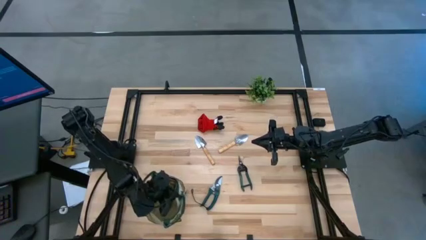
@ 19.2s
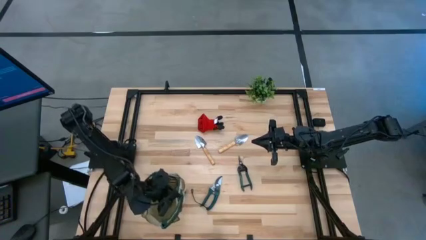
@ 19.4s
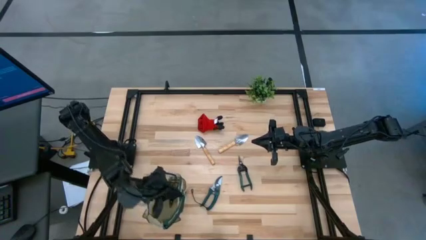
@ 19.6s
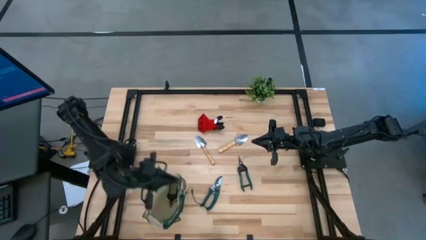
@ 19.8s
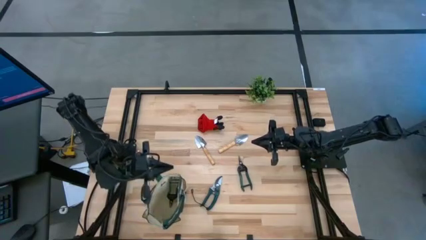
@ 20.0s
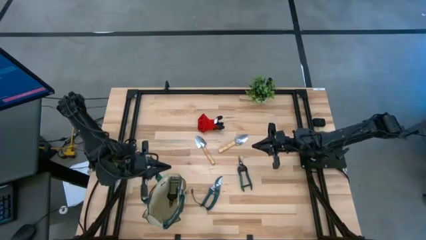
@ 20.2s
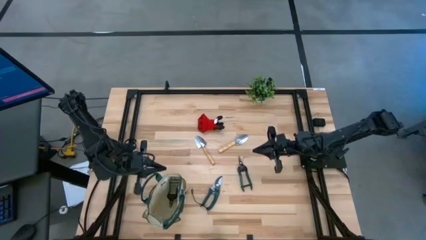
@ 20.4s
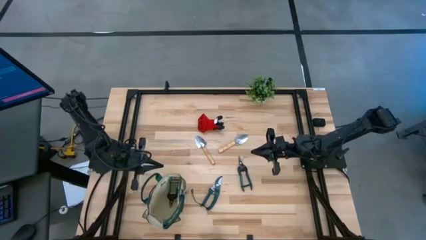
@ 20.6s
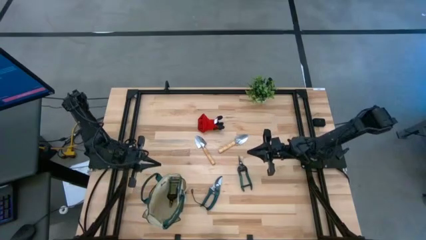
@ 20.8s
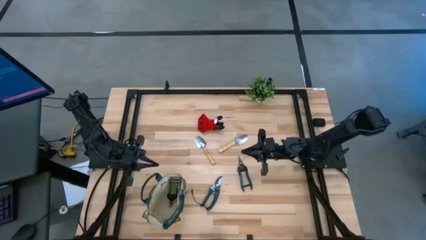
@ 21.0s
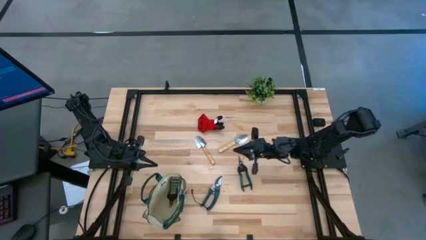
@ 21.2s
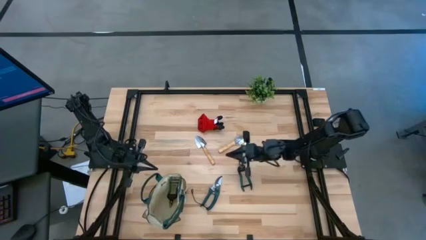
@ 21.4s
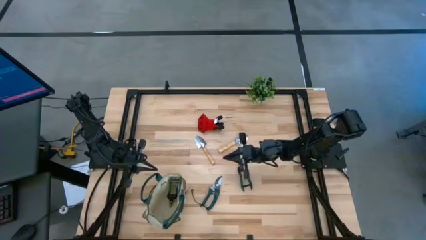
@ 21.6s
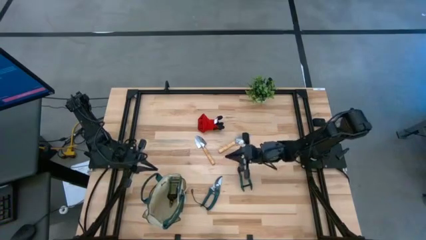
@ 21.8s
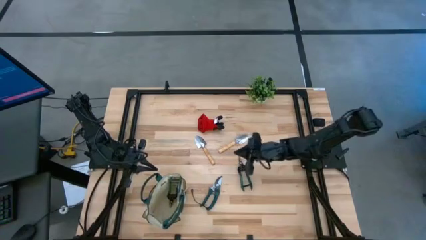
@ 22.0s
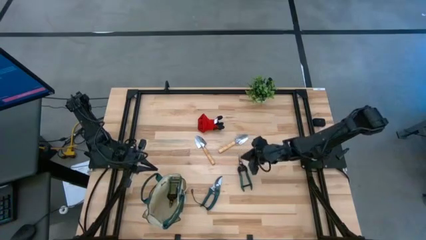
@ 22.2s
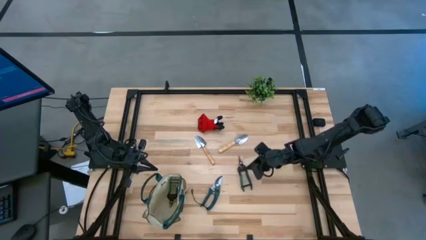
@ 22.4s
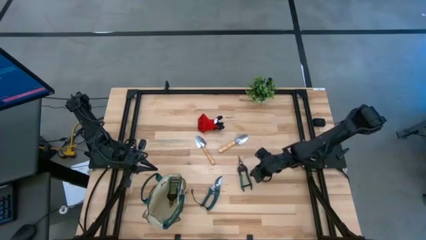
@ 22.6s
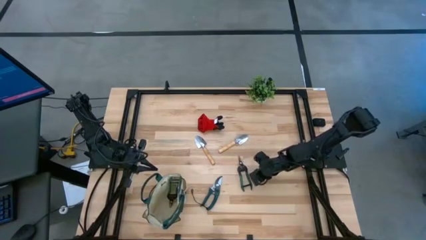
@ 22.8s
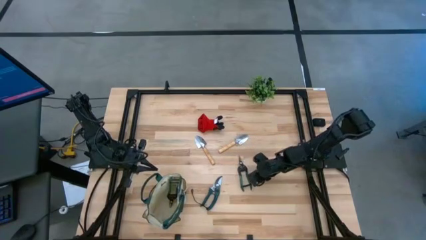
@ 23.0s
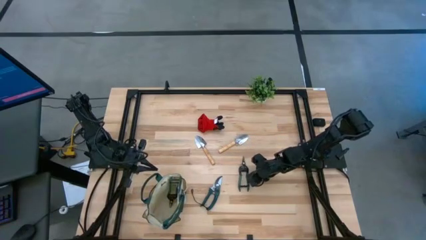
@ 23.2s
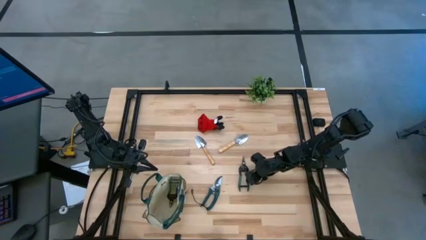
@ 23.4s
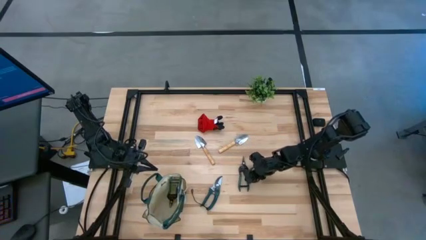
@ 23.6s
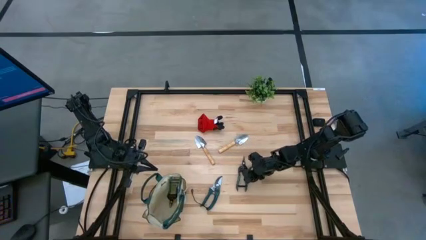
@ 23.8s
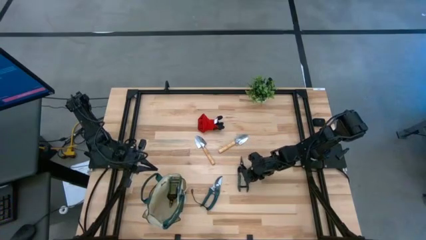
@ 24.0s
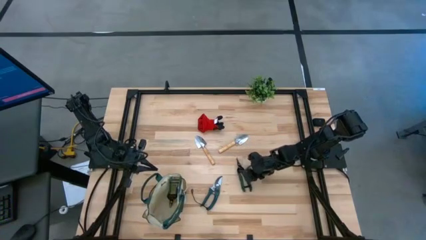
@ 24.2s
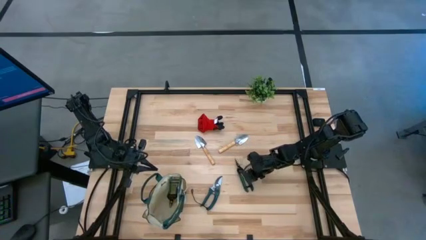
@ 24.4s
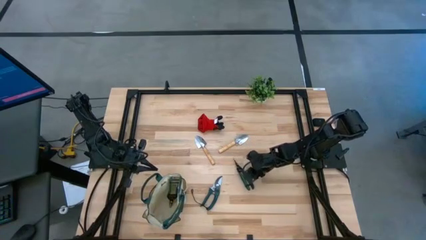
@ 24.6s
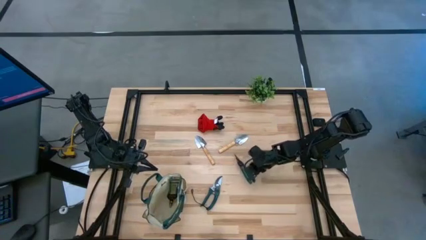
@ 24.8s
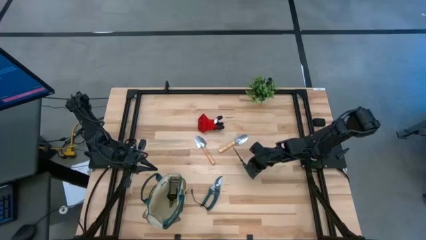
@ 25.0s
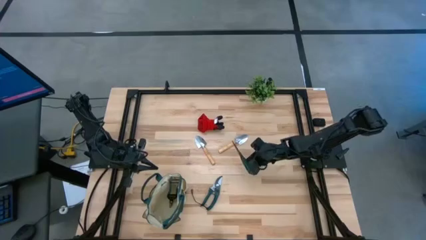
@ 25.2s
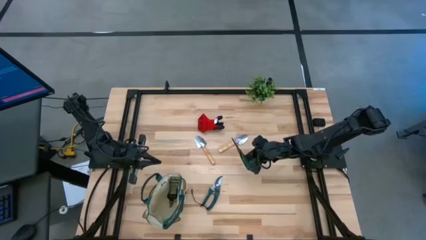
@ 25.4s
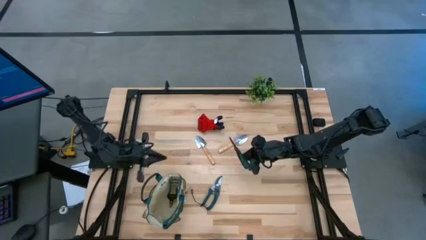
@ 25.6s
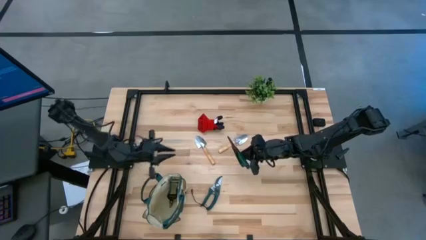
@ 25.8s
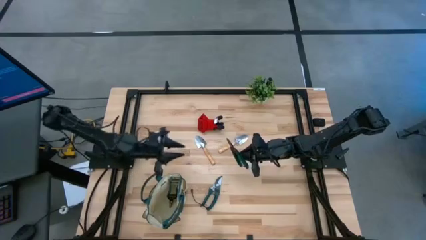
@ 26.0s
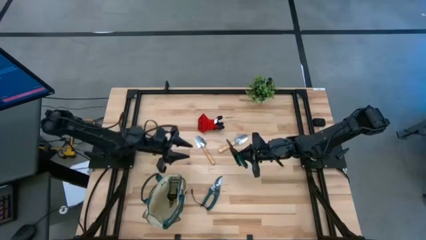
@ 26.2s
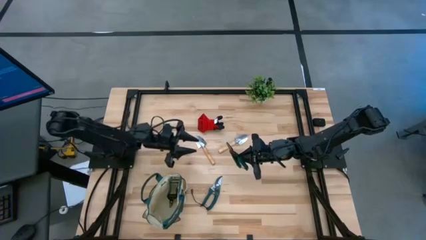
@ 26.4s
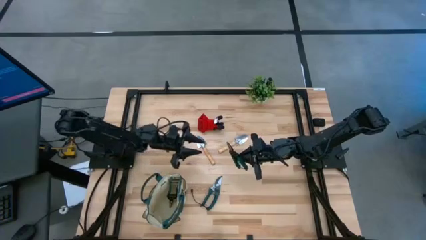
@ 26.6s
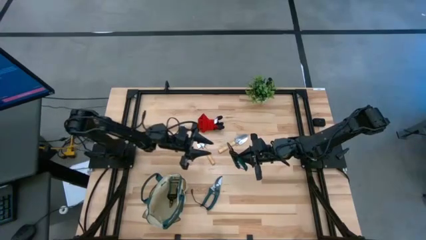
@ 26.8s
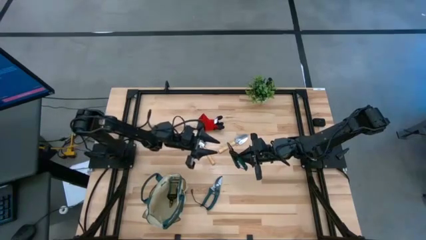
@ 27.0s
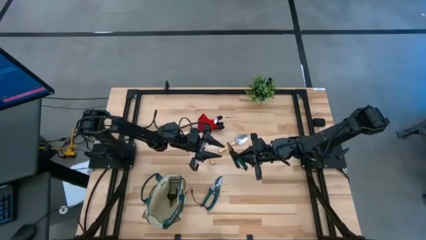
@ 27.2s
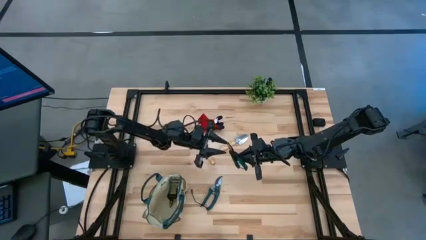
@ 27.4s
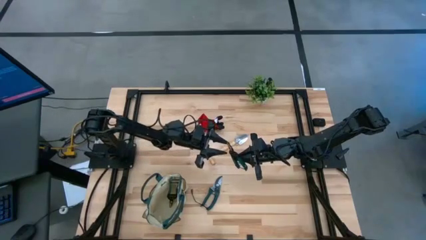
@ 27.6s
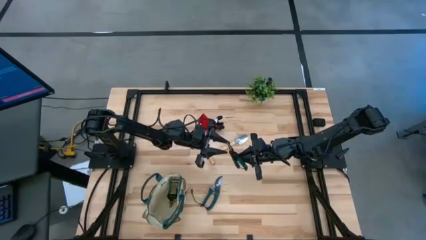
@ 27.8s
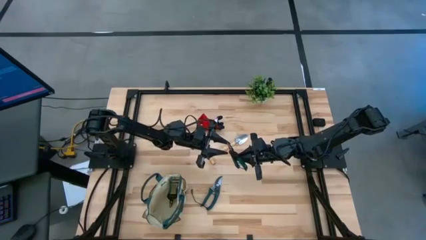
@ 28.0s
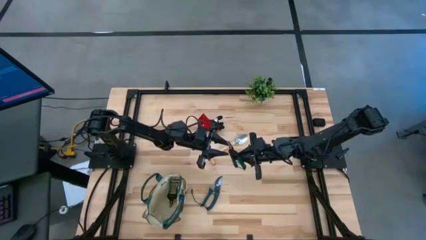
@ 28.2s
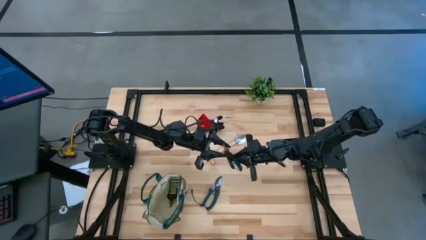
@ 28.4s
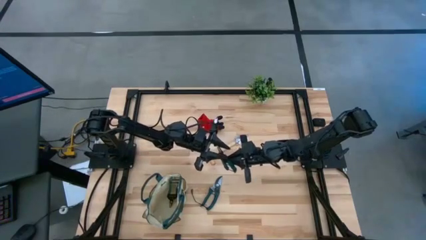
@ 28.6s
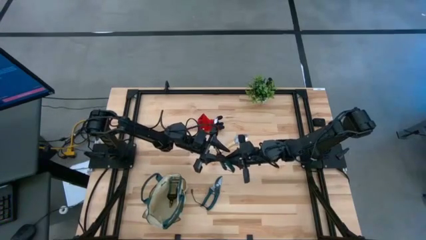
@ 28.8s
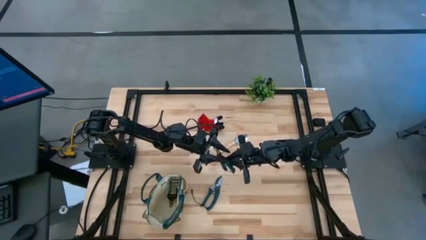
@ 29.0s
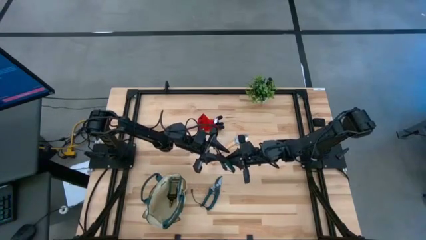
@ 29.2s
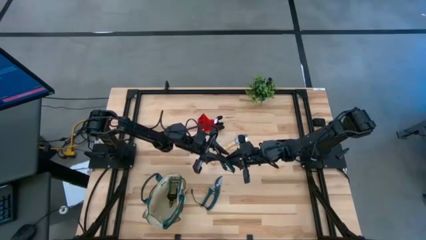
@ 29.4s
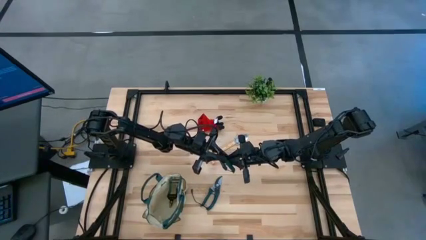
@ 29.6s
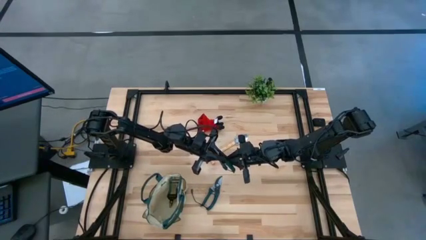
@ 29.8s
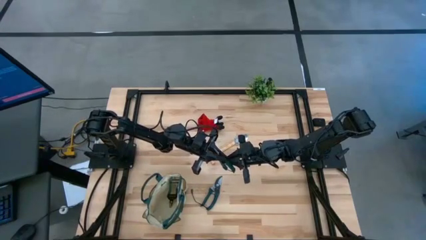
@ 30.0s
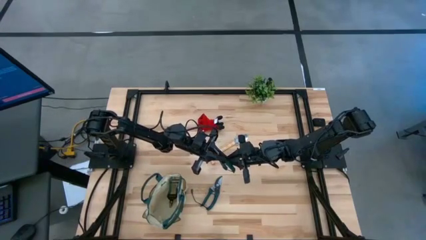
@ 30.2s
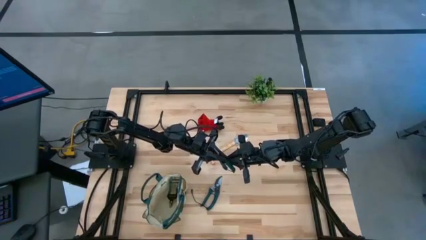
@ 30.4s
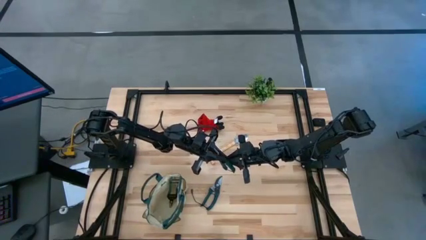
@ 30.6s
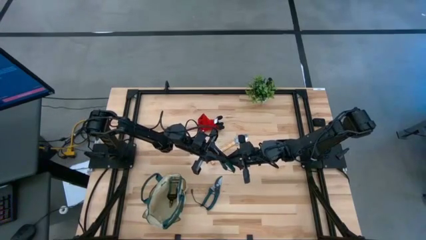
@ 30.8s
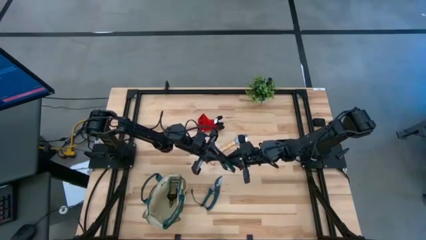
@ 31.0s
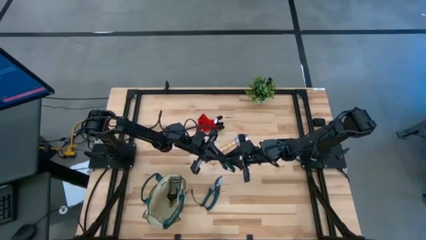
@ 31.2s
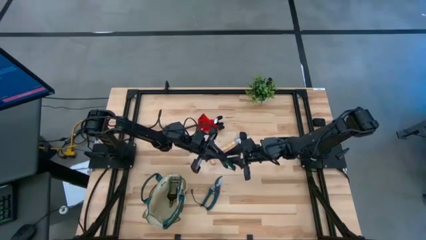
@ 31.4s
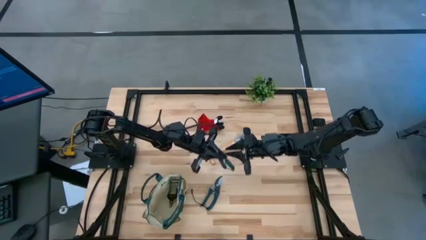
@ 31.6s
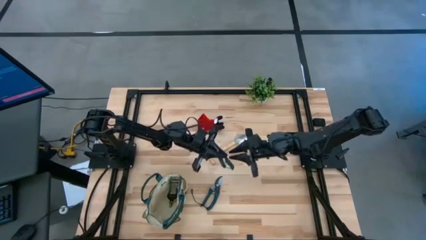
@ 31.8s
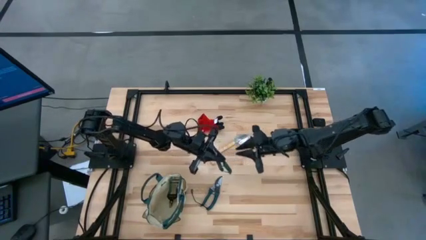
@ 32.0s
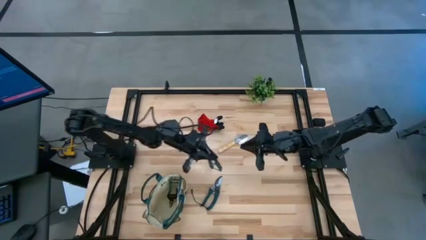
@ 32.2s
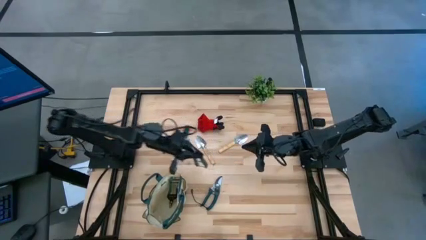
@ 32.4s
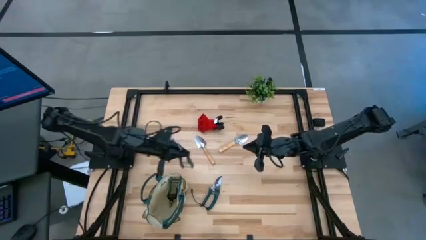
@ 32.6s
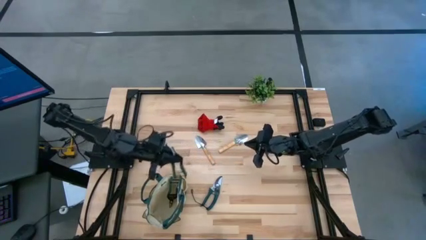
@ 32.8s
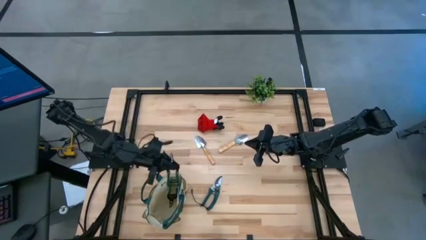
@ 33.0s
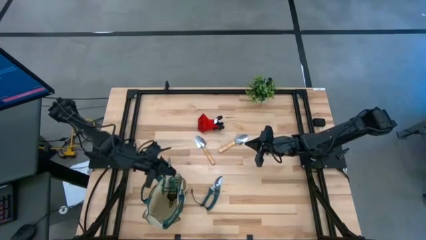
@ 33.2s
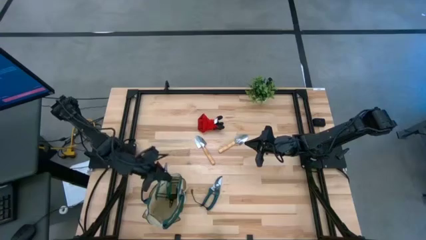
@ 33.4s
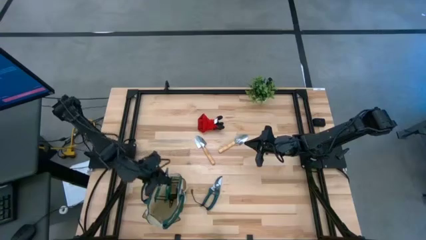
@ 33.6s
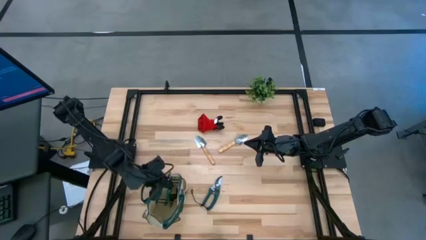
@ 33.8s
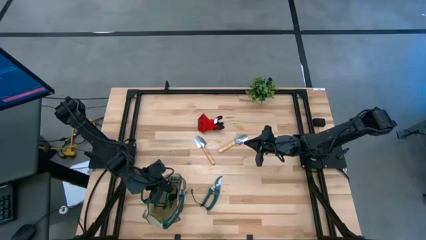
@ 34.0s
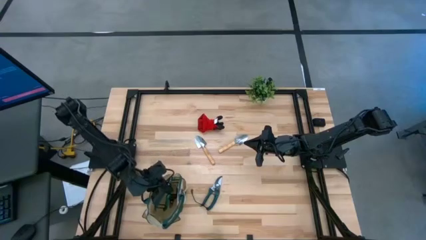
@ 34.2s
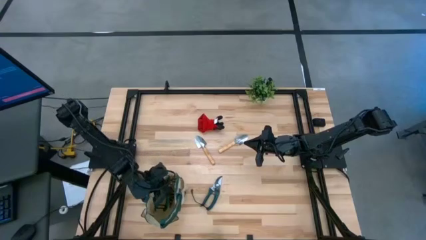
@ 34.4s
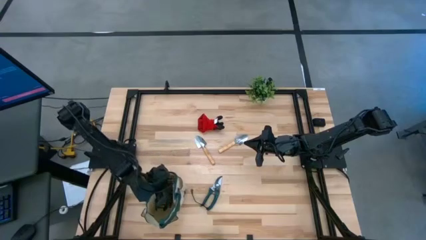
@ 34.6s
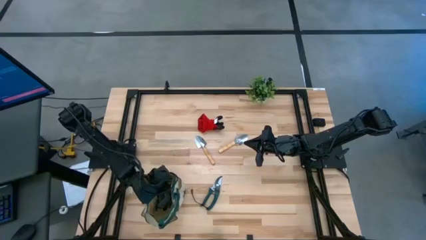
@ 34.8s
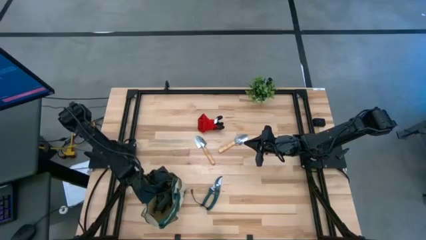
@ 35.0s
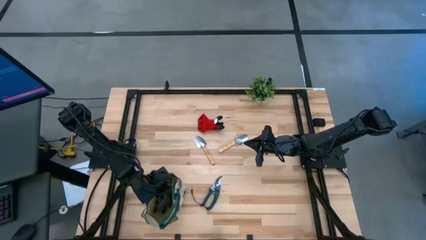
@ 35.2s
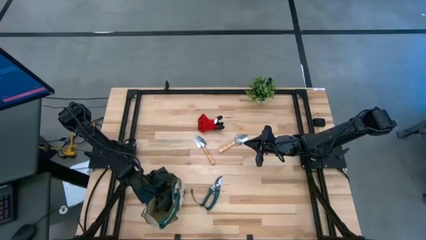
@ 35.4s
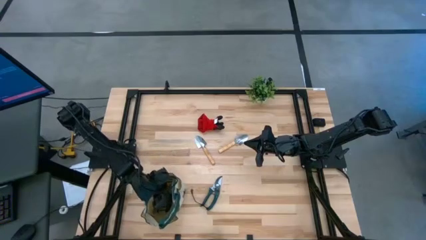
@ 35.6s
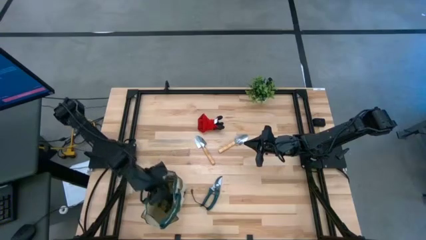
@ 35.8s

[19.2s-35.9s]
Task: Pick & Place Garden tools in Gardening bag
Put the green fruit pruner into the green gardening bag
